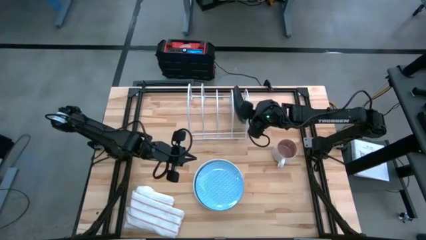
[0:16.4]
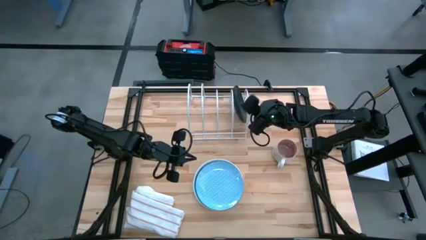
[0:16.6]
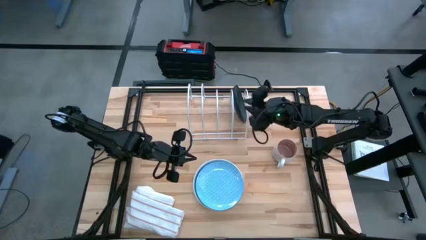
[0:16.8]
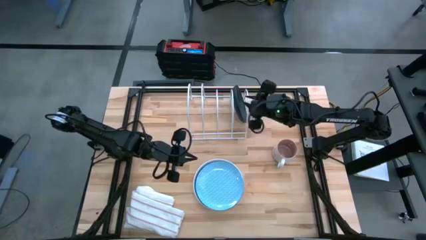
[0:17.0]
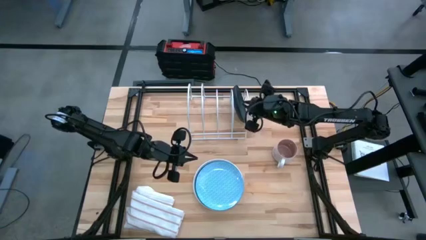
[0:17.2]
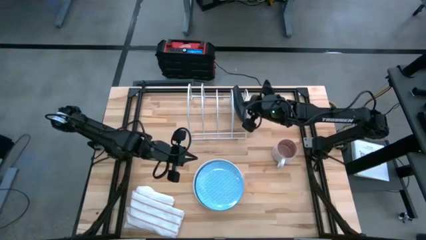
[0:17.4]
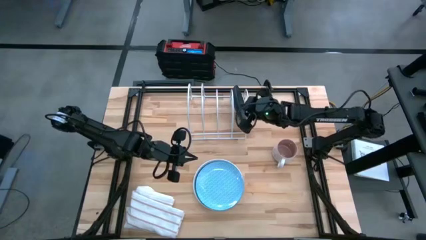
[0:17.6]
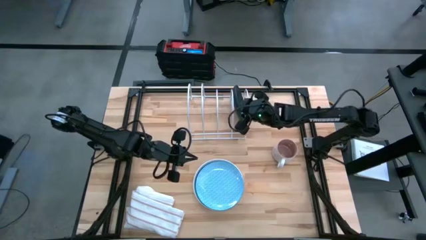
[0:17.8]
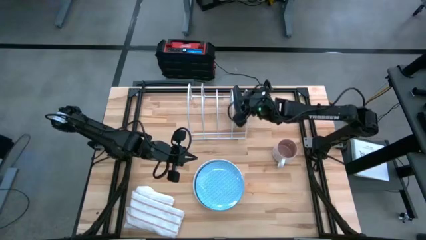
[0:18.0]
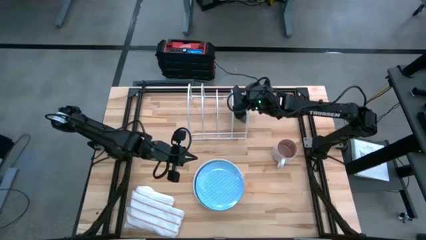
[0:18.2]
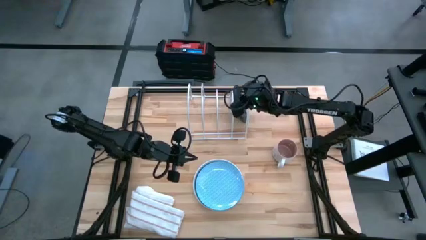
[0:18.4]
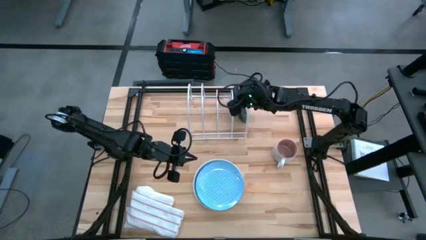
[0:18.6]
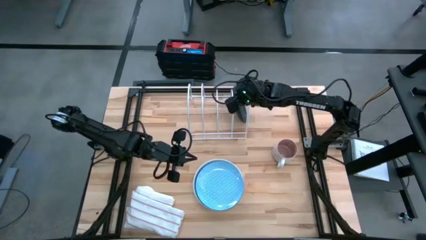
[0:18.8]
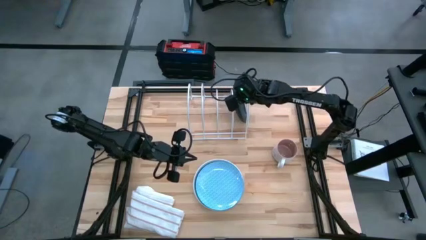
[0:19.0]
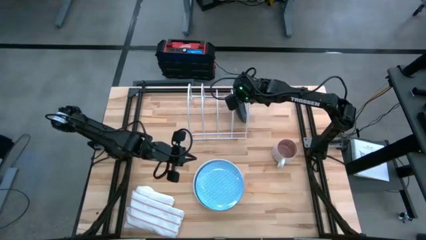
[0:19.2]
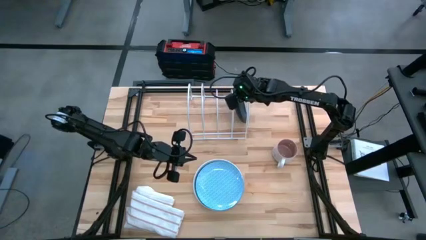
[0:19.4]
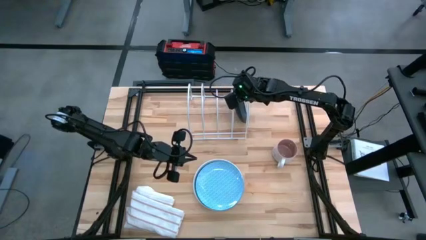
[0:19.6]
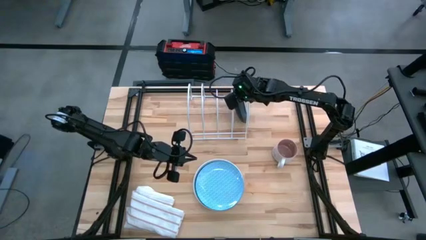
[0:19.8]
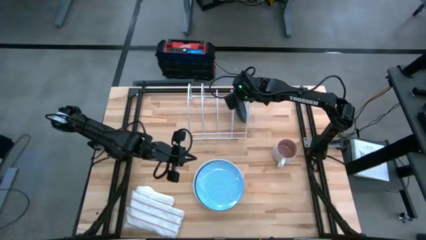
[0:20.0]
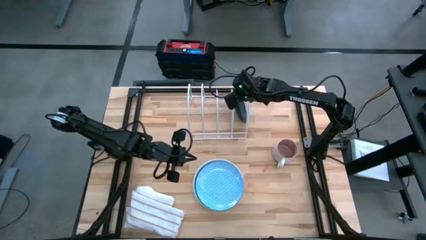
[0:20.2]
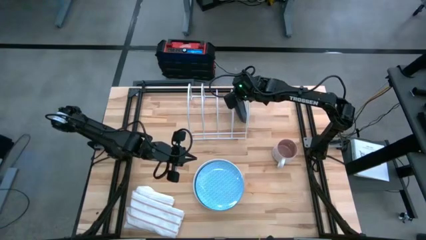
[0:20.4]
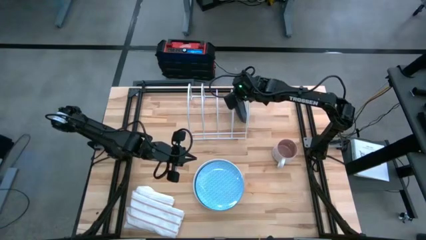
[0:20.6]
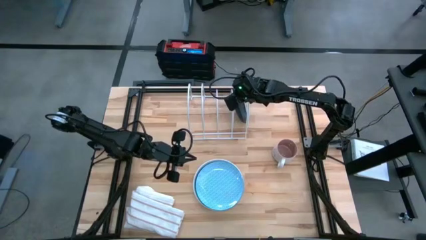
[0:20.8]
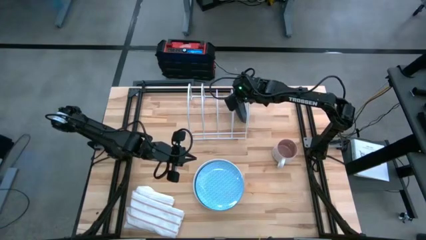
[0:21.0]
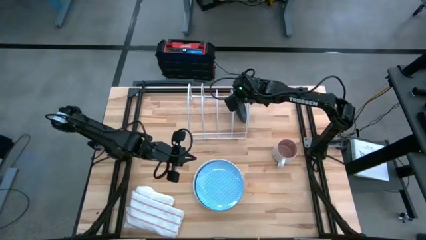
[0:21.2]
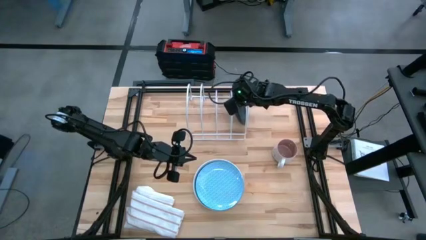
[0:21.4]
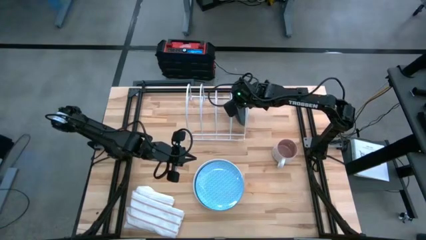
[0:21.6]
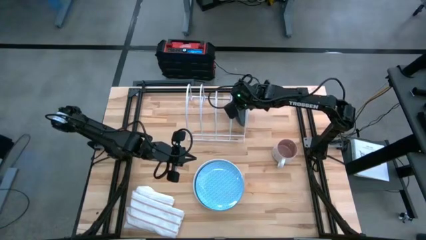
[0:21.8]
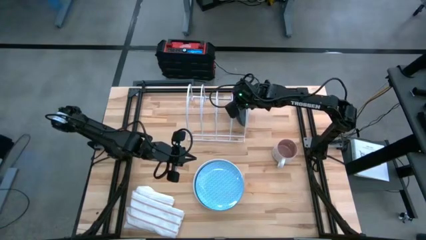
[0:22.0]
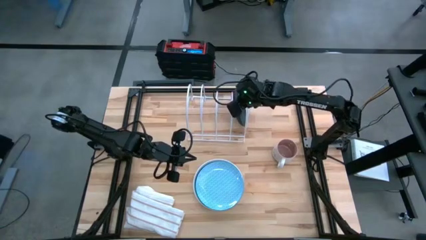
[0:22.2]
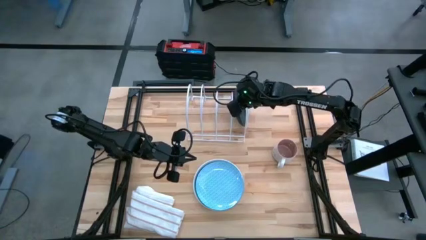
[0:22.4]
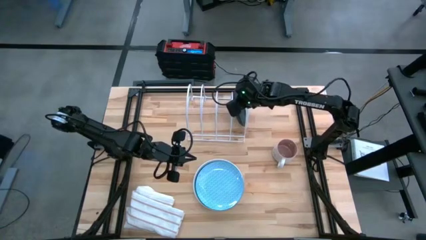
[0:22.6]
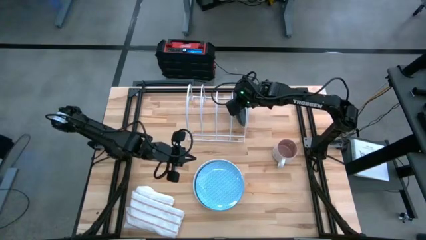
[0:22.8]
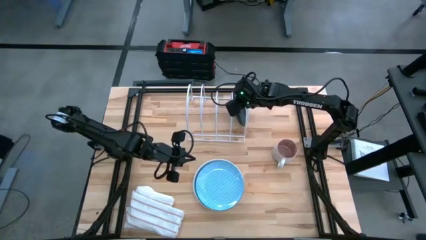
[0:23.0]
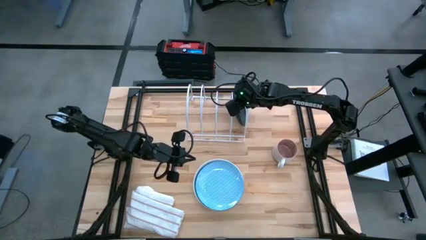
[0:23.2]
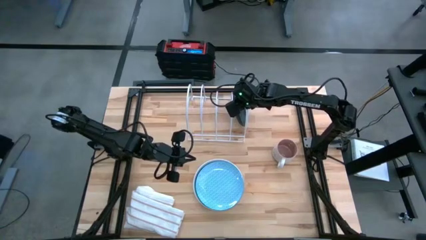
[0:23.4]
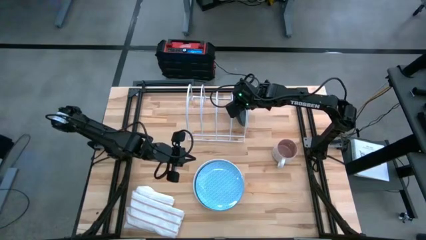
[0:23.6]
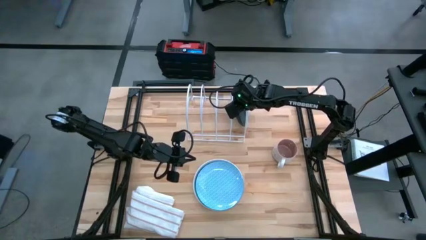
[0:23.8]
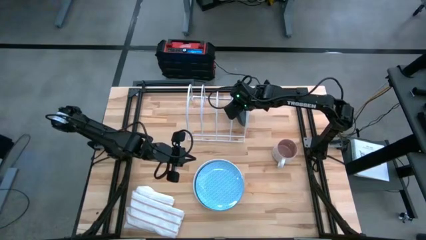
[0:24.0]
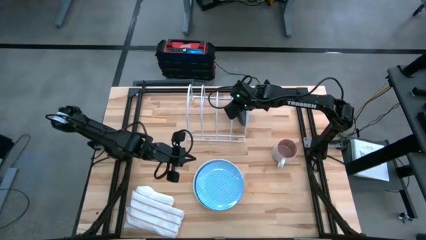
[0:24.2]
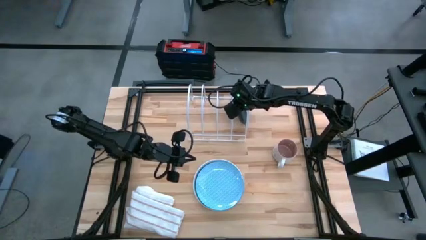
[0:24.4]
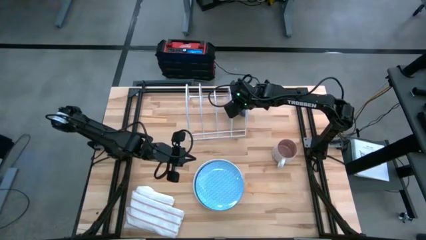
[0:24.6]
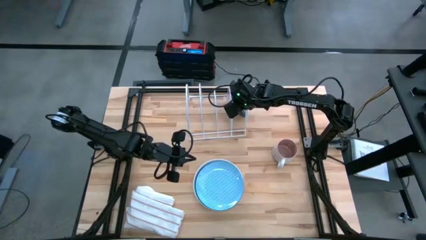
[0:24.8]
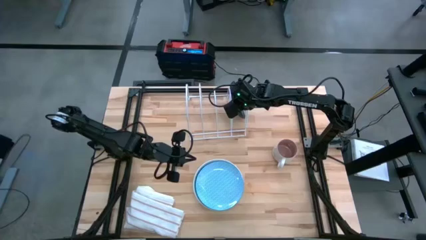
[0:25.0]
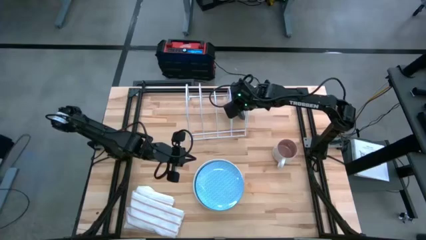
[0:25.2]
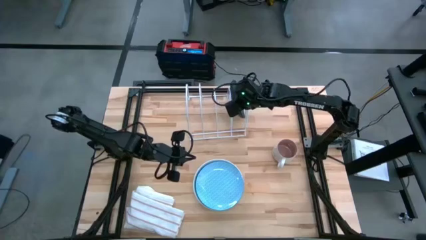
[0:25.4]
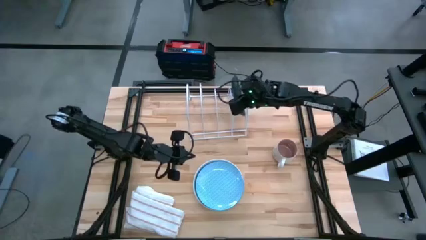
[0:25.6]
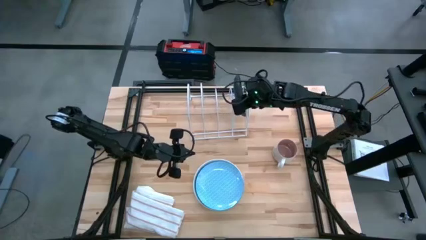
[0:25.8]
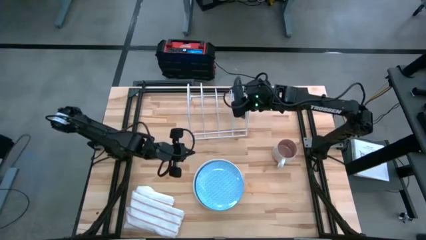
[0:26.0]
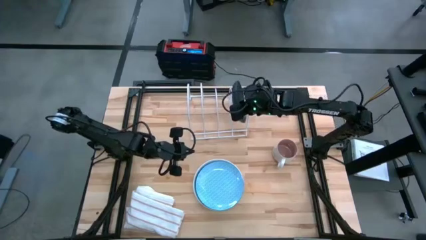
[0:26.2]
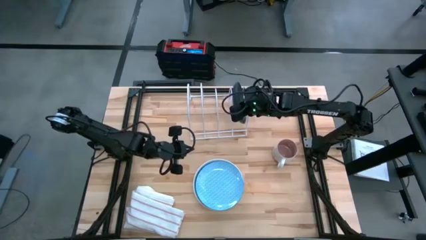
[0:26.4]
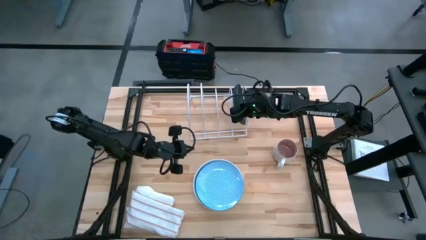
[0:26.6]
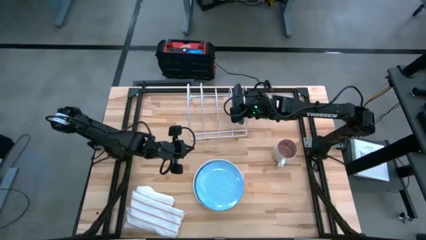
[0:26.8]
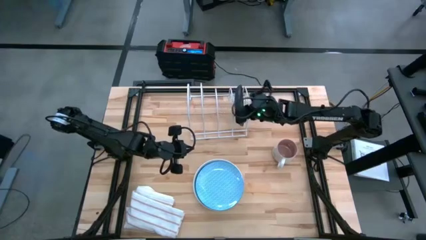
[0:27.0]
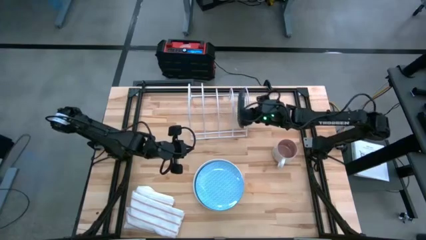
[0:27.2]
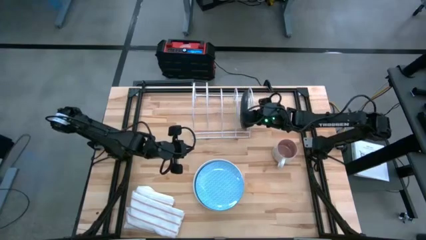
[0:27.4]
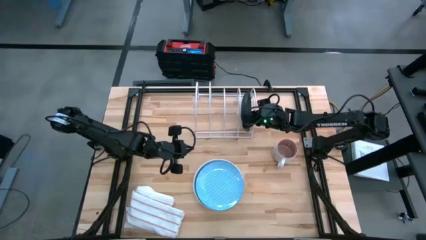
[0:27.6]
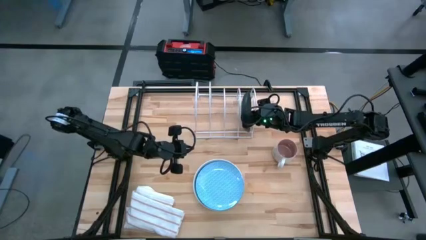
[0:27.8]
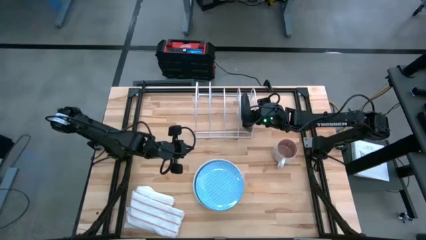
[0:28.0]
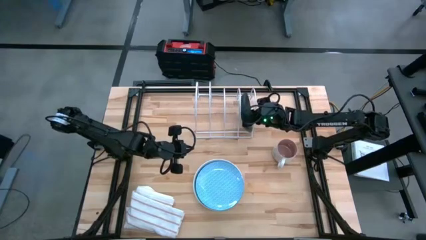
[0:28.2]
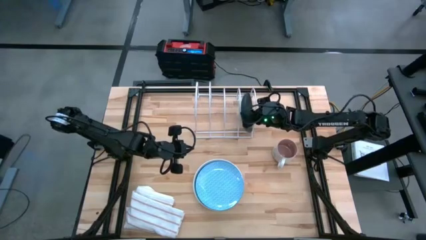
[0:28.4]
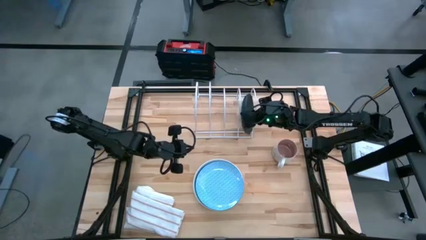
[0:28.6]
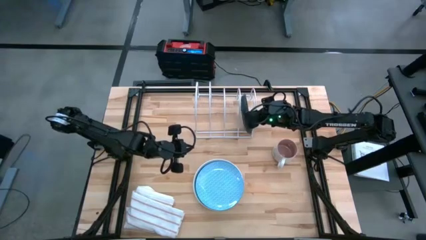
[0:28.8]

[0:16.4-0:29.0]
Task: Sort dishes
Put the black plate in the dish rack

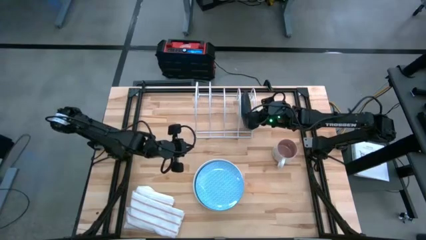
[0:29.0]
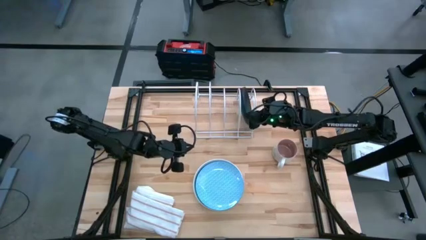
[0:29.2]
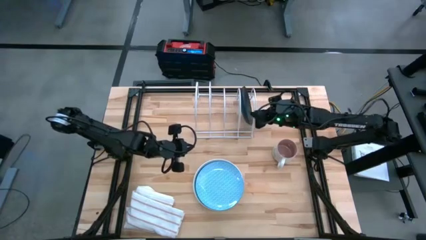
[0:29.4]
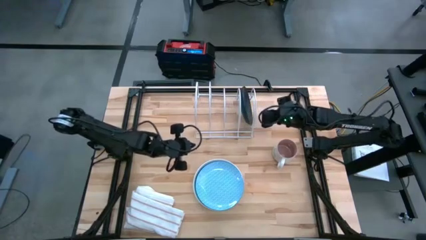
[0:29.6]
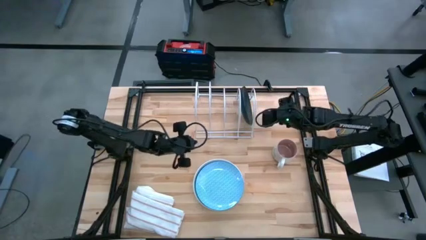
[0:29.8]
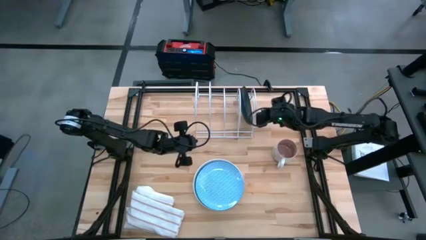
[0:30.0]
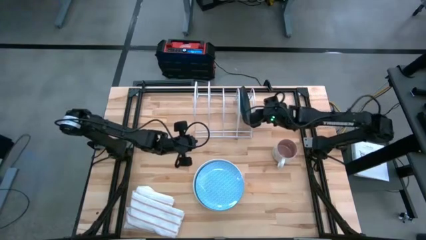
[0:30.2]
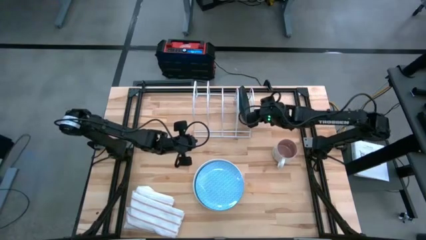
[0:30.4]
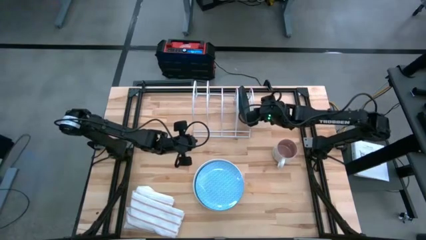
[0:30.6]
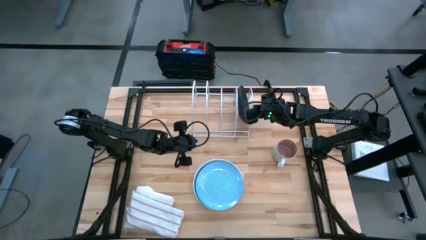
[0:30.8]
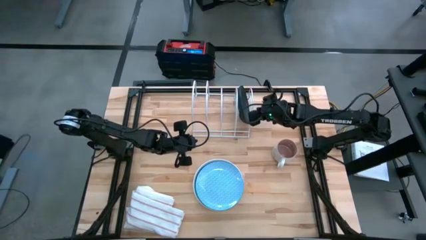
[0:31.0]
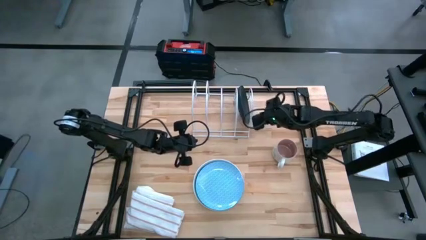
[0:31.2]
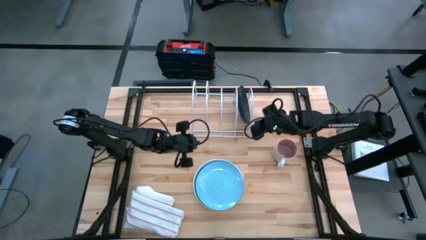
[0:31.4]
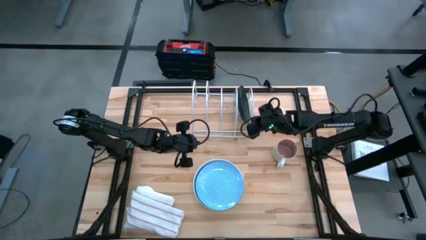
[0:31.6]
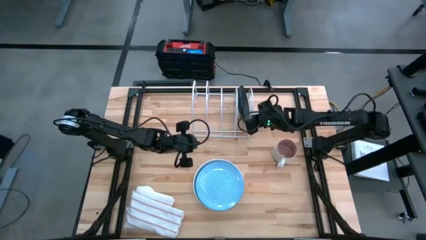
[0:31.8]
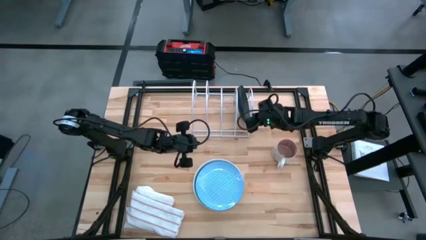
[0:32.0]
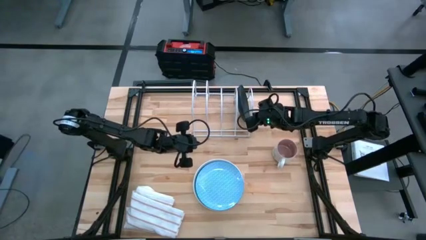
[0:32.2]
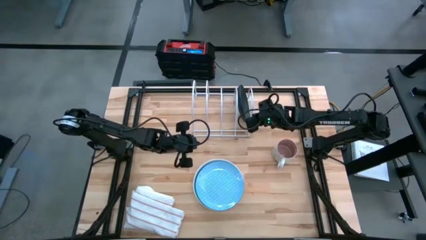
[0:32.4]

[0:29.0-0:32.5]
Adjust the dish rack
